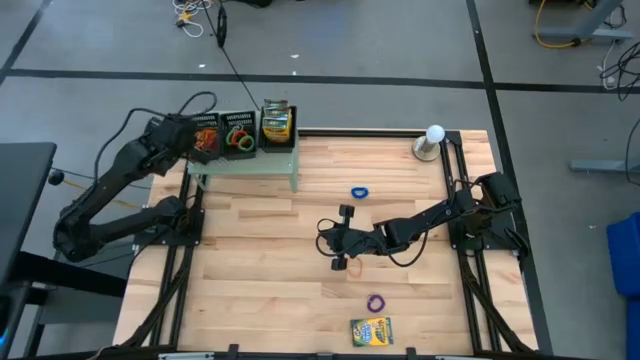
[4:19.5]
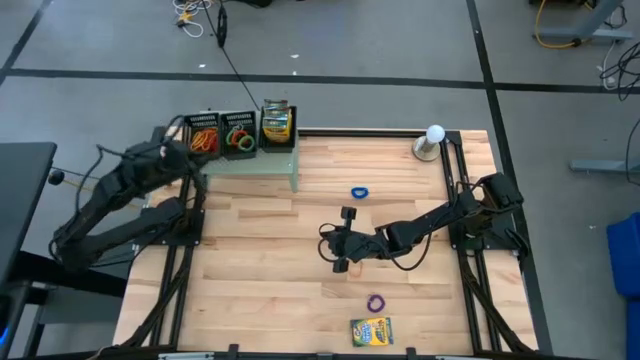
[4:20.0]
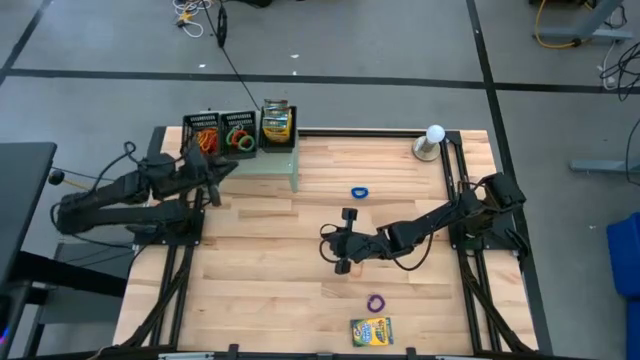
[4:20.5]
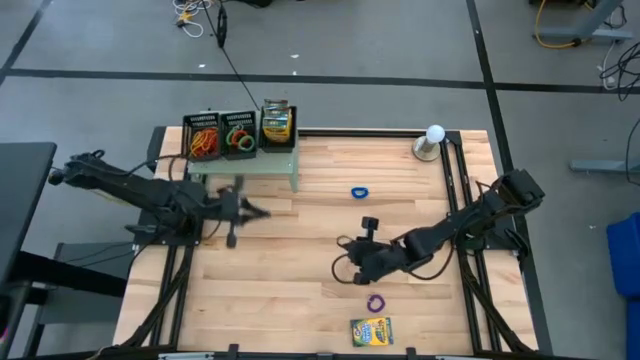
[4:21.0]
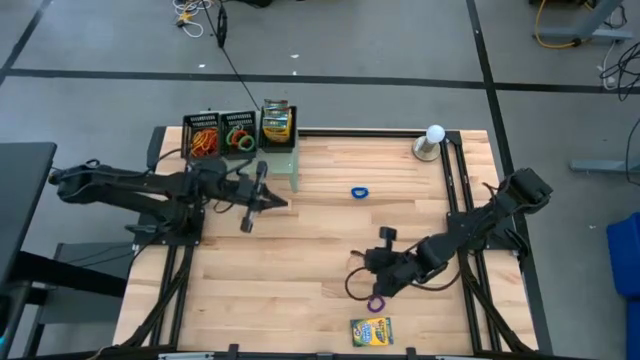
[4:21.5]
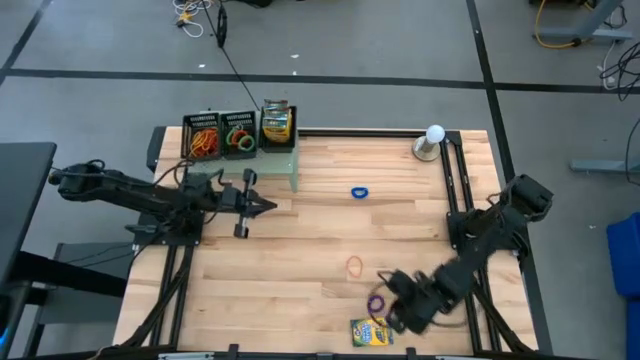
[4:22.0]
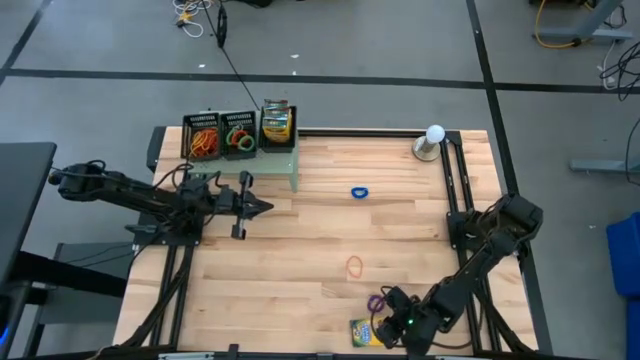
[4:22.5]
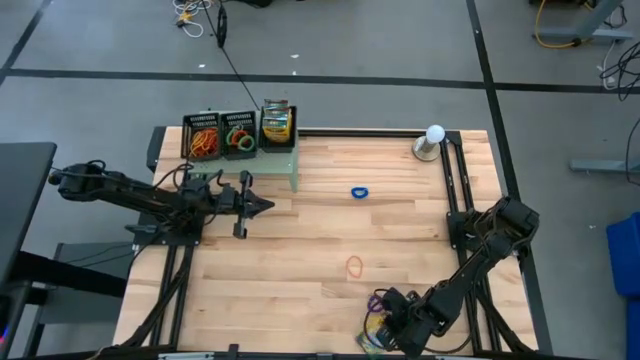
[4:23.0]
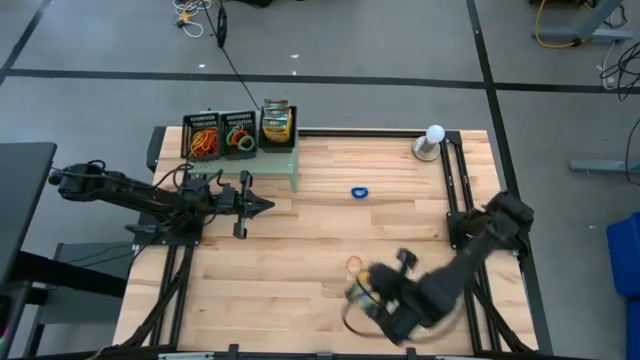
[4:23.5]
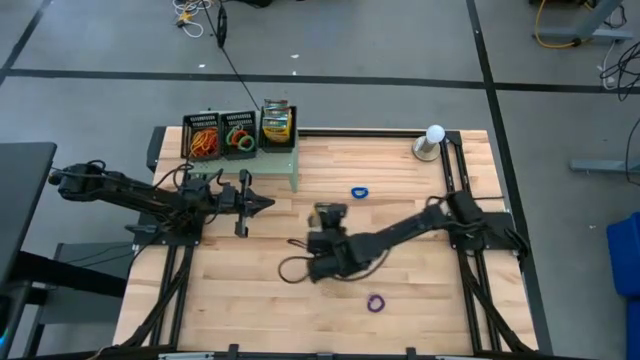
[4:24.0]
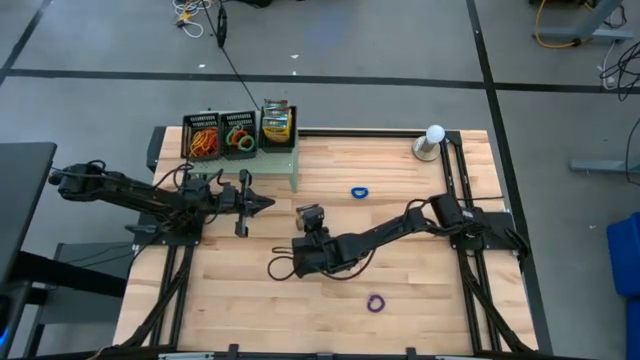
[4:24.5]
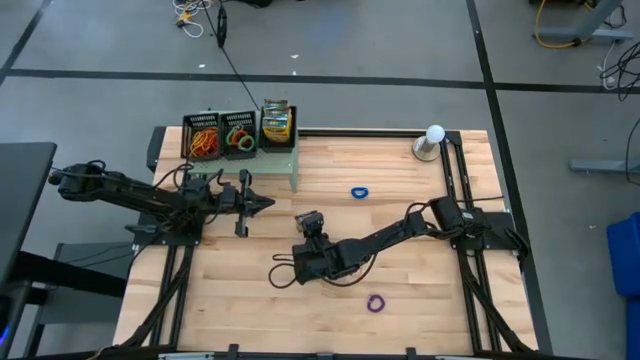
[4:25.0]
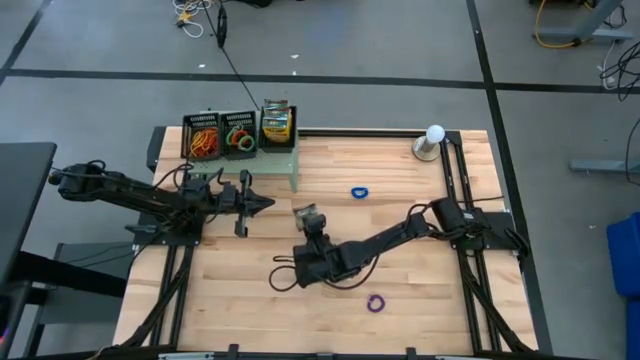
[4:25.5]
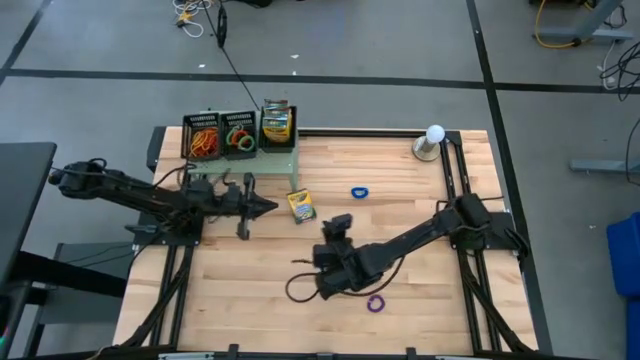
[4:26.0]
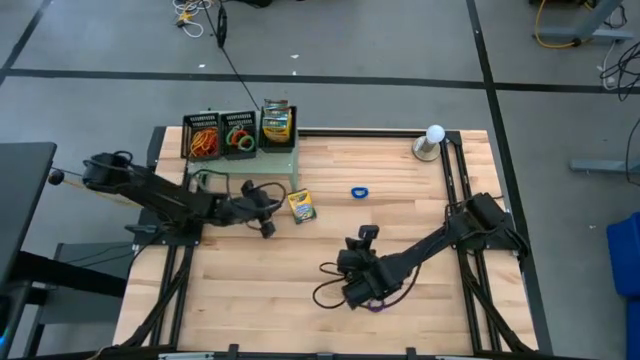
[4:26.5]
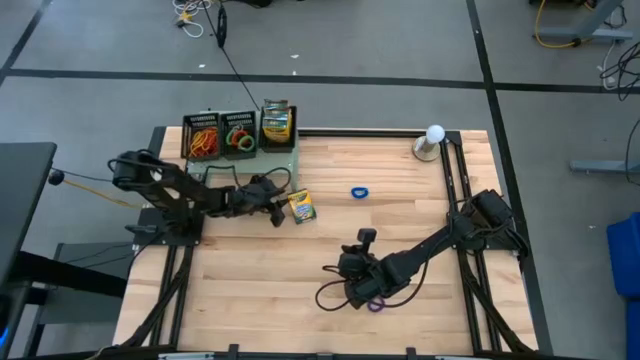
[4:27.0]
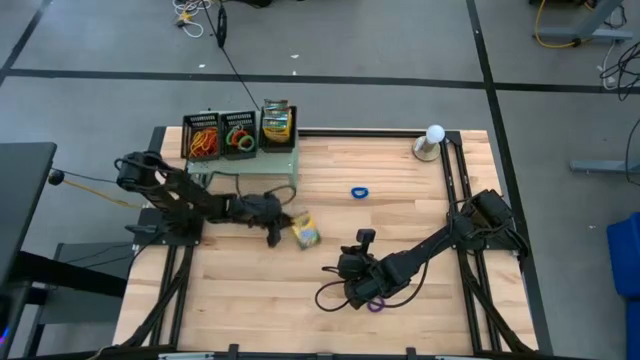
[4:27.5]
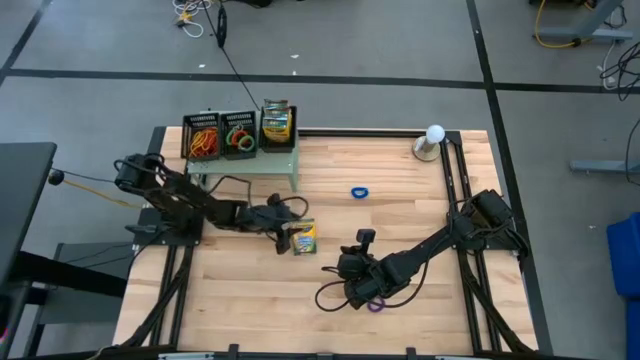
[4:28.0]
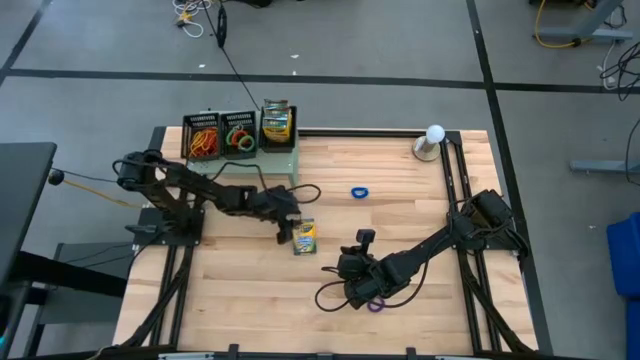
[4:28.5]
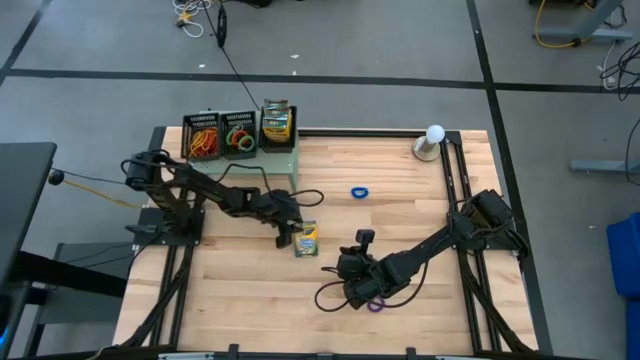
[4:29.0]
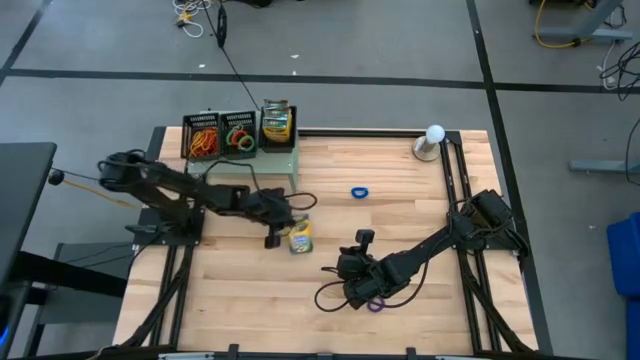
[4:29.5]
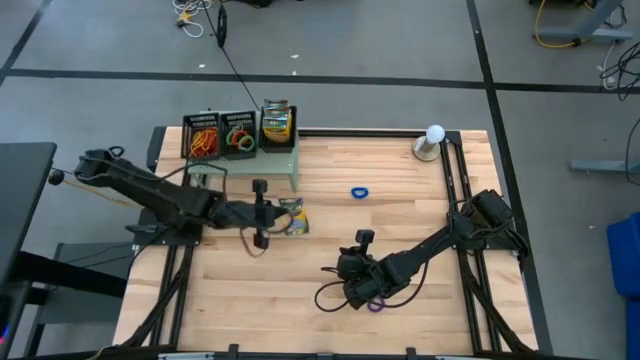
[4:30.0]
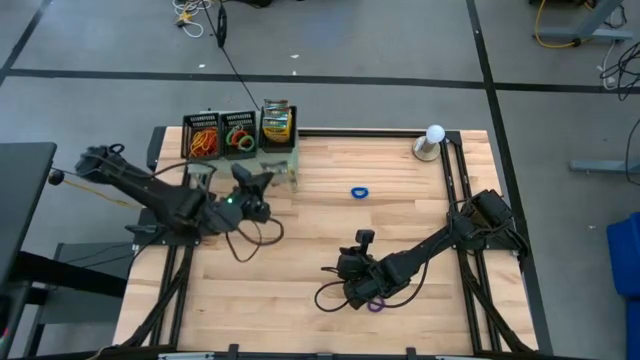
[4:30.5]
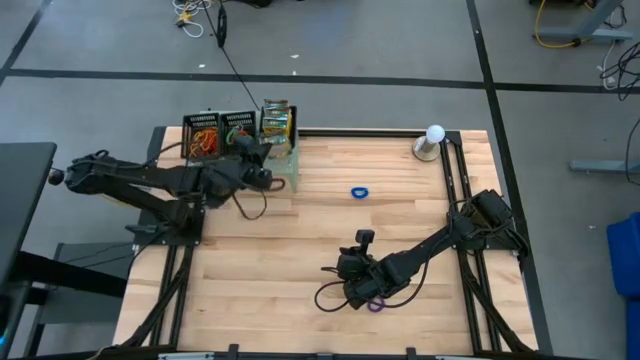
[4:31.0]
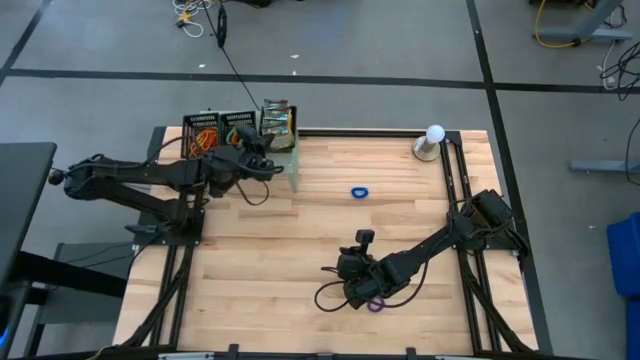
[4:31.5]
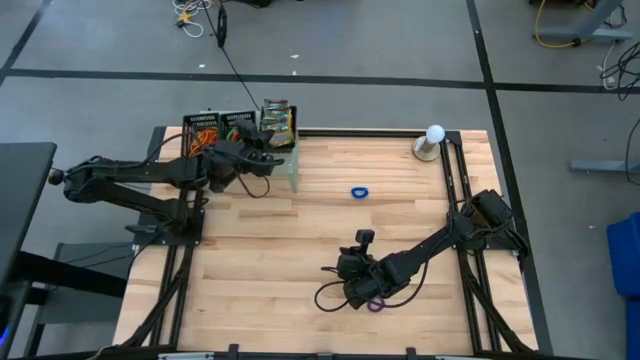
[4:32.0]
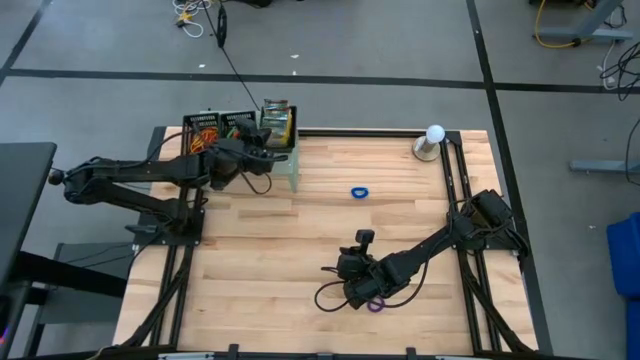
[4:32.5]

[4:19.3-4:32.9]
Task: Pick & Place Office Desk Supplies
Put the crayon box into the right black bin on the shelf

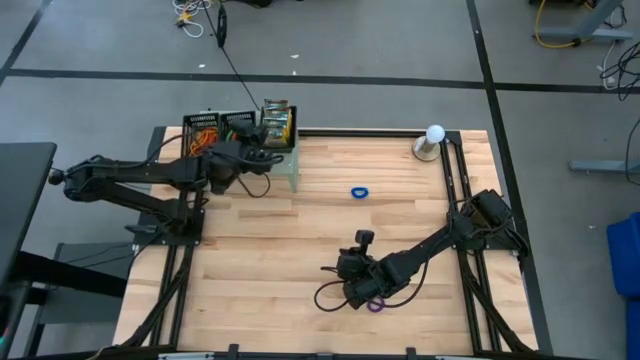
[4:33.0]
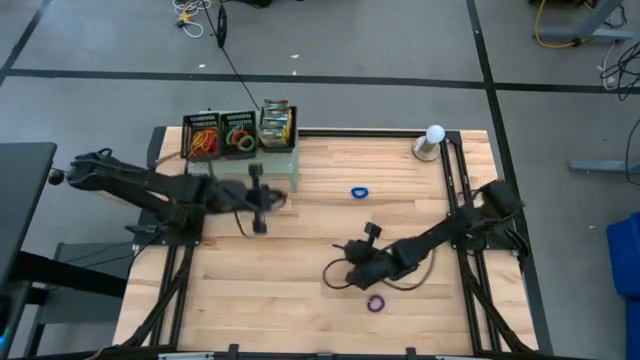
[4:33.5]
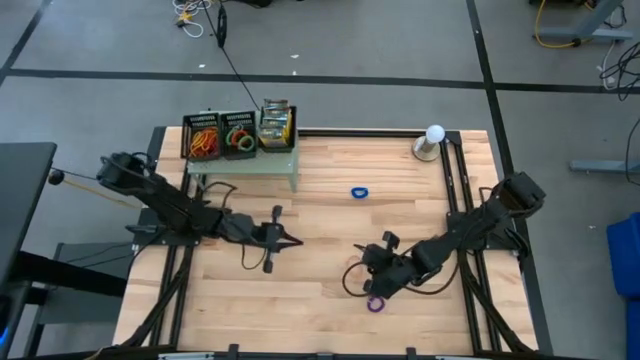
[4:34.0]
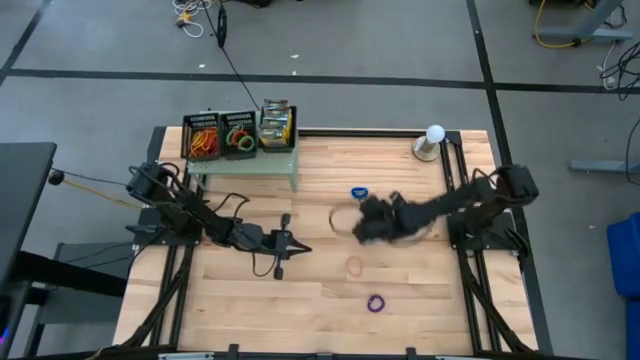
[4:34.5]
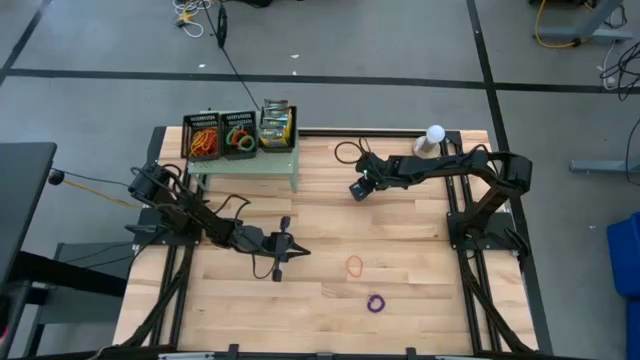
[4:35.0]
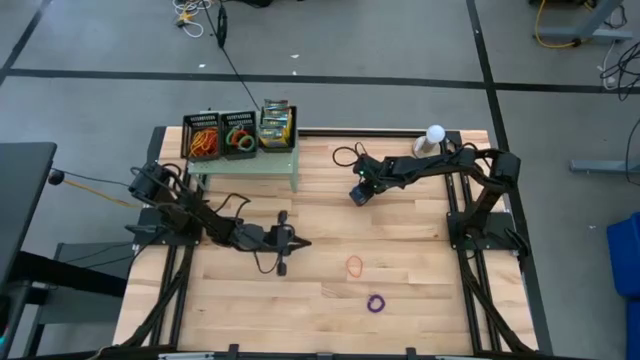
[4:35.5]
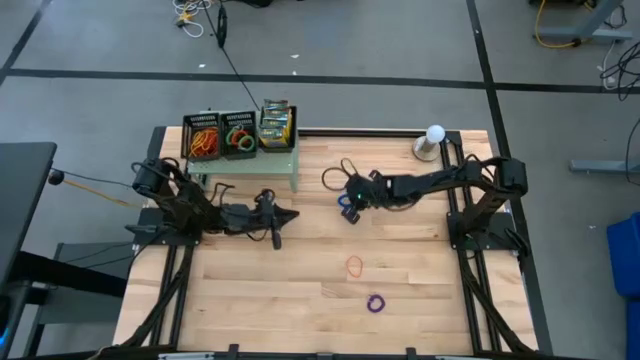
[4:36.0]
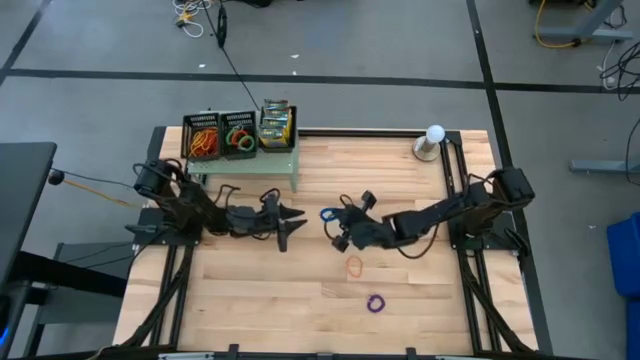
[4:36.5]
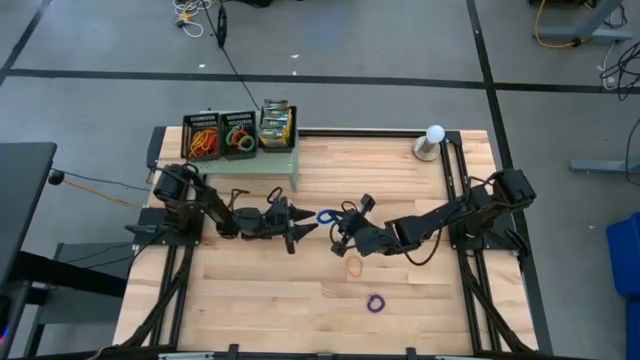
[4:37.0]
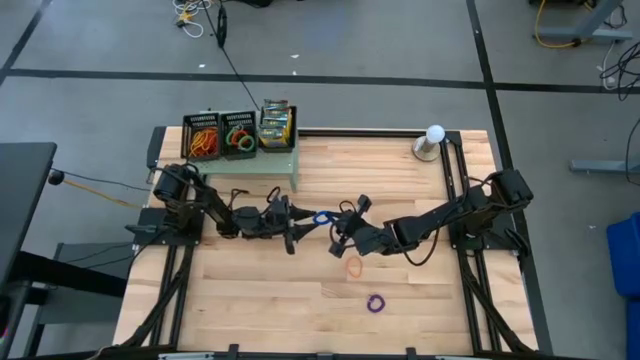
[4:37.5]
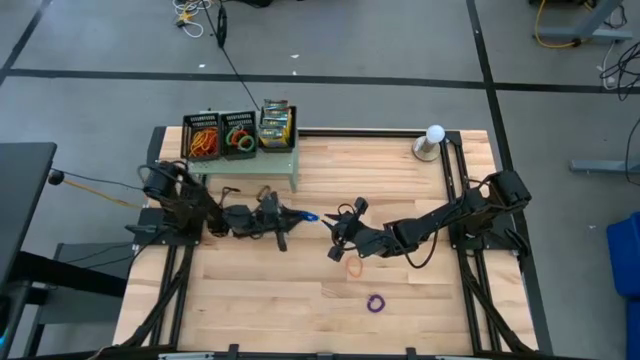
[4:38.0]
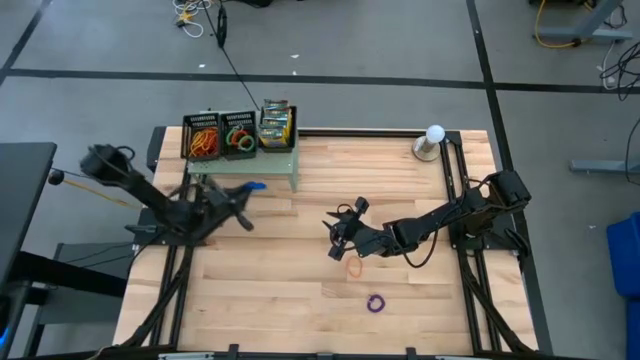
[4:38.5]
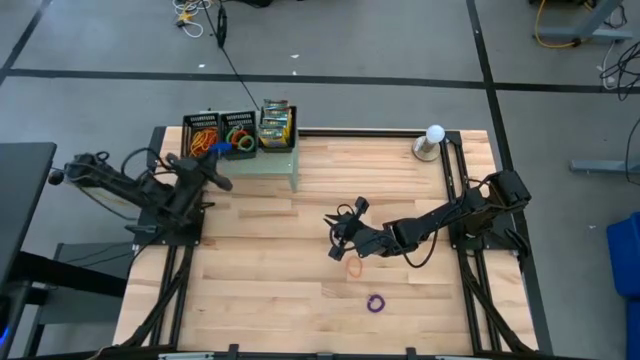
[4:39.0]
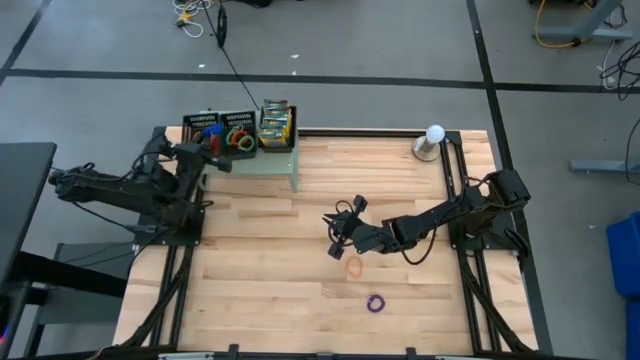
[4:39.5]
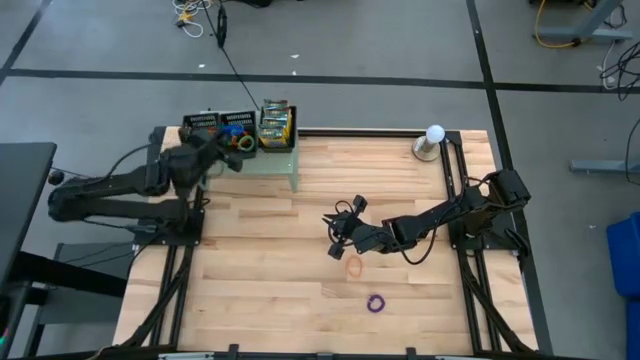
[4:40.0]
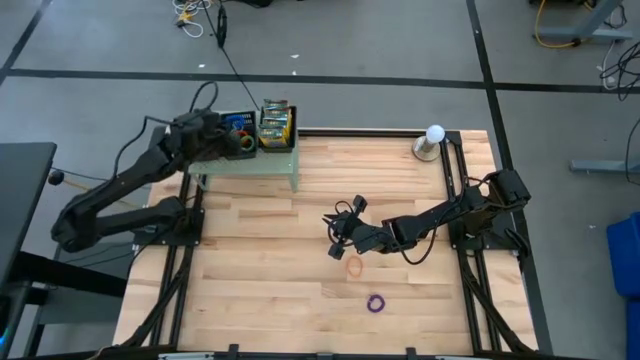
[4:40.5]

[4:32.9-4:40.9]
Put the blue spring keychain into the middle black bin on the shelf

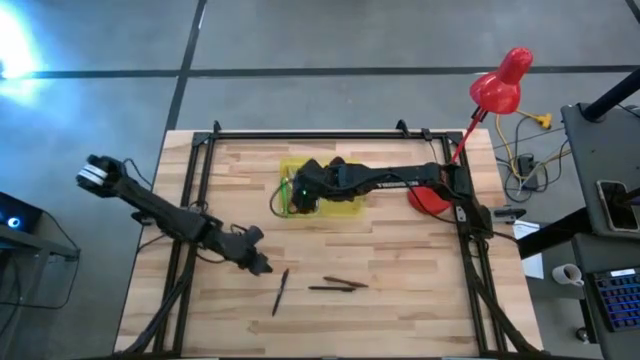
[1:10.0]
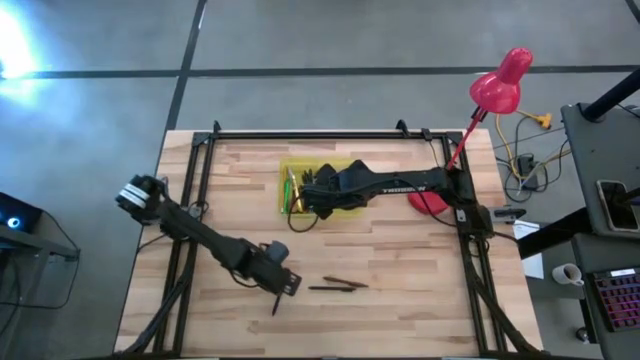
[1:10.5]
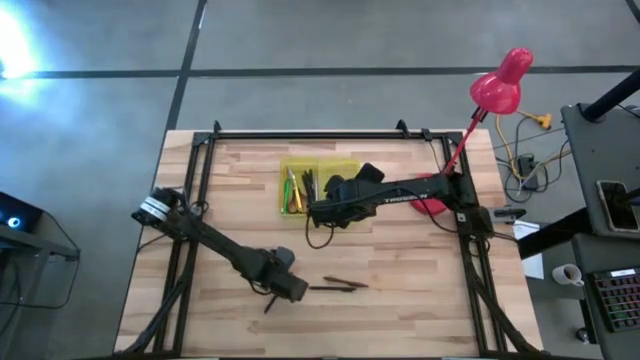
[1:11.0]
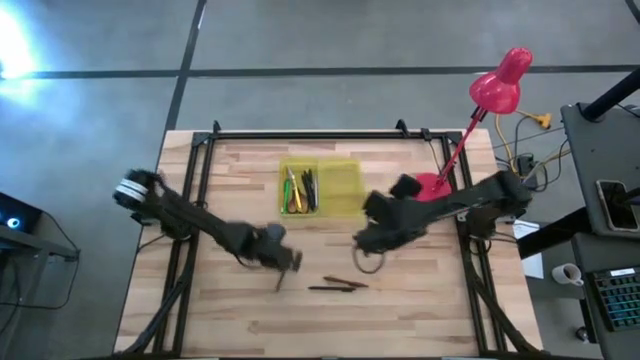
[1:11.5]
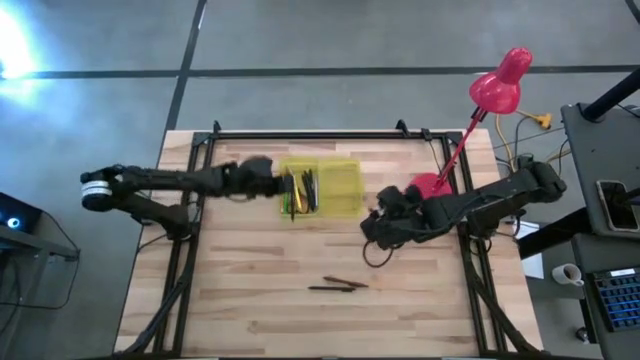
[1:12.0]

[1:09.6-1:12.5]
Task: Pick & place school supplies into a supply box
Put the black pen into the supply box
